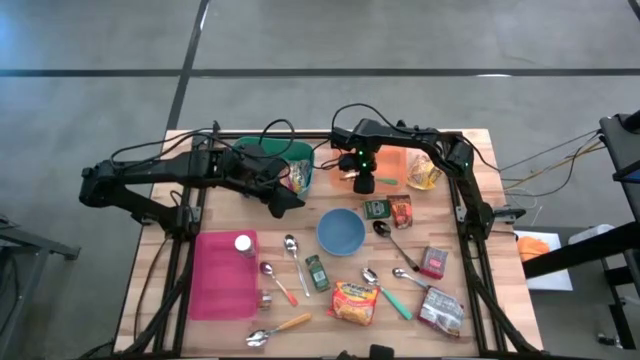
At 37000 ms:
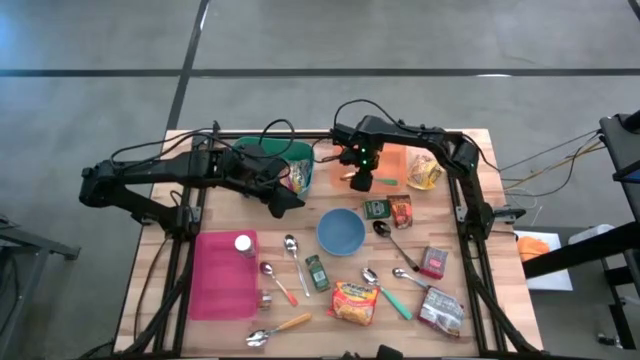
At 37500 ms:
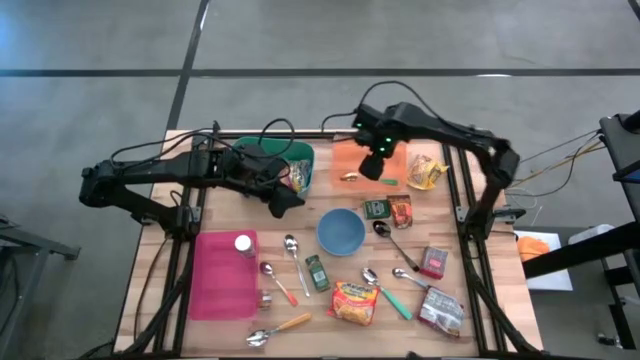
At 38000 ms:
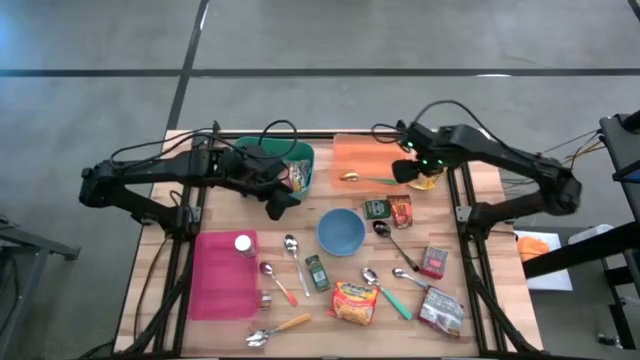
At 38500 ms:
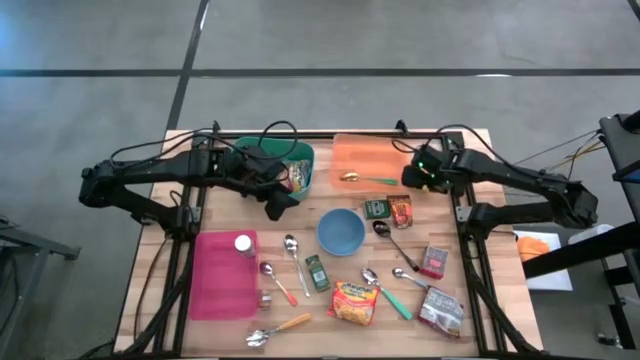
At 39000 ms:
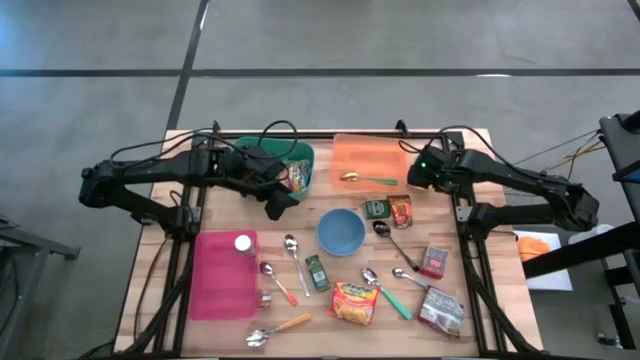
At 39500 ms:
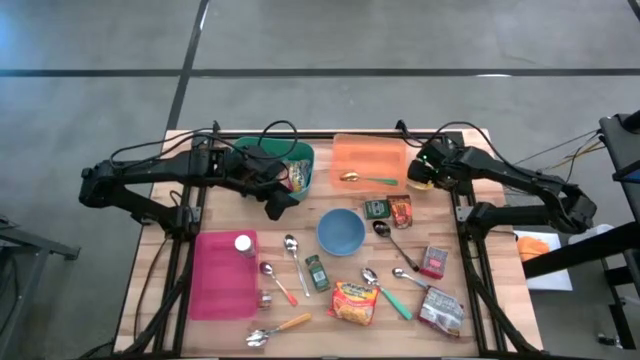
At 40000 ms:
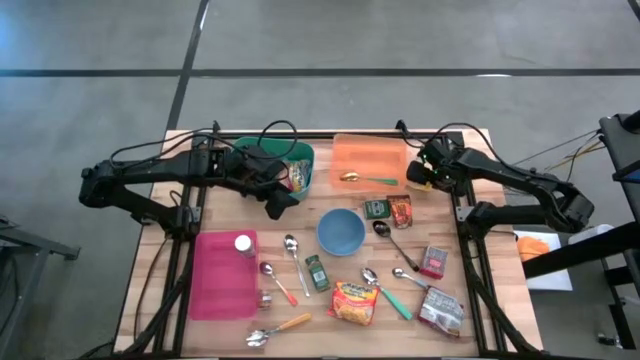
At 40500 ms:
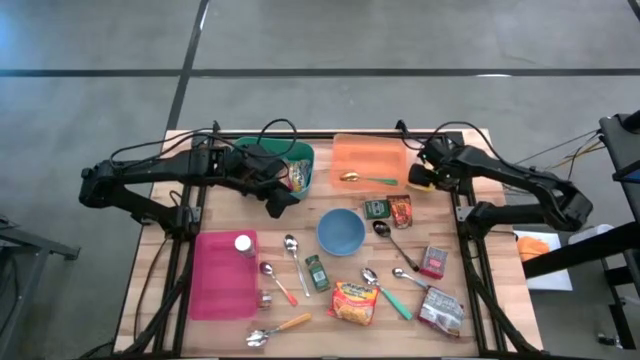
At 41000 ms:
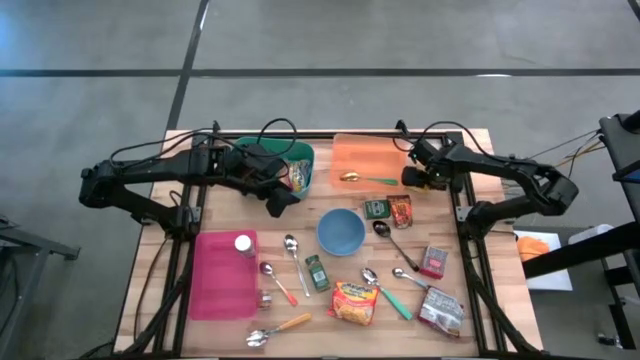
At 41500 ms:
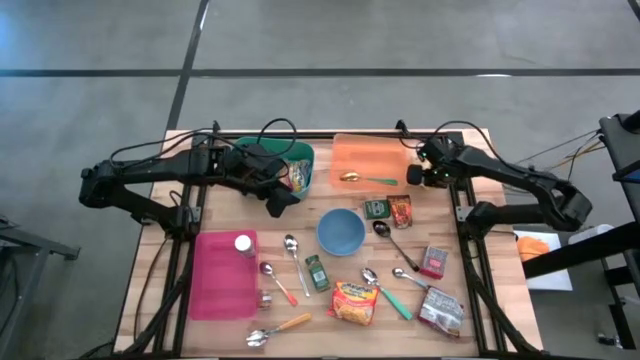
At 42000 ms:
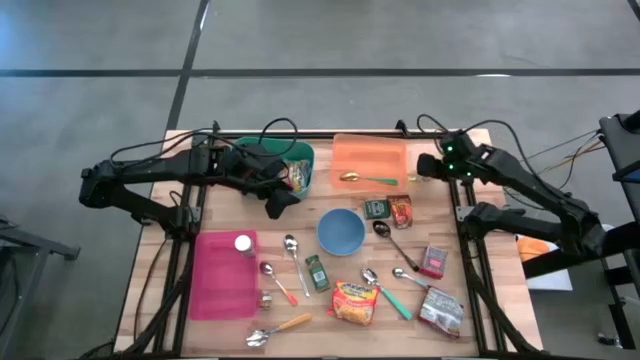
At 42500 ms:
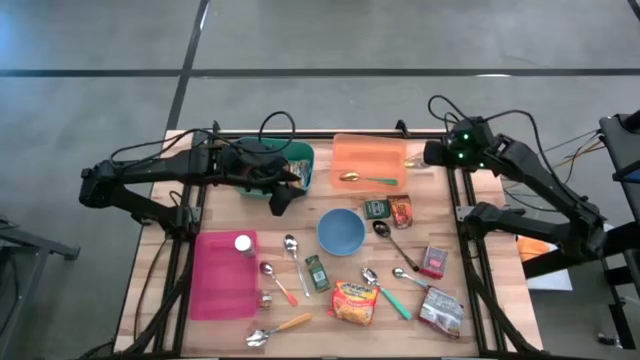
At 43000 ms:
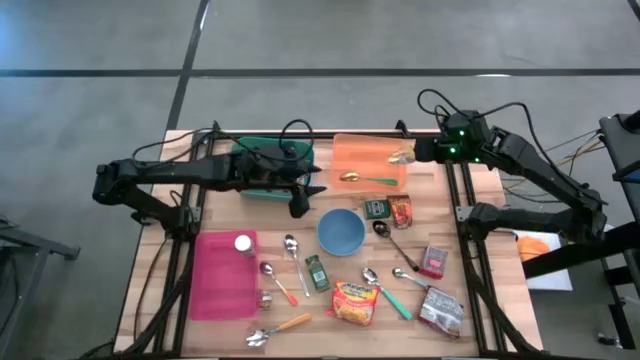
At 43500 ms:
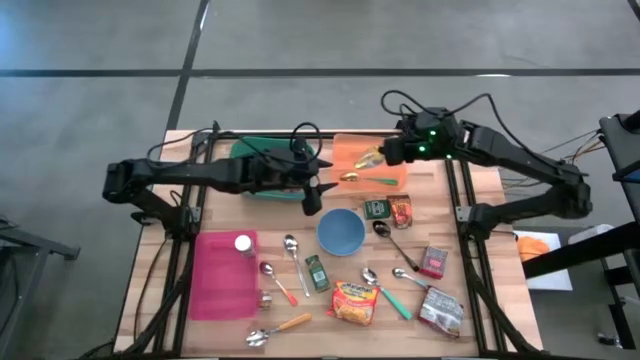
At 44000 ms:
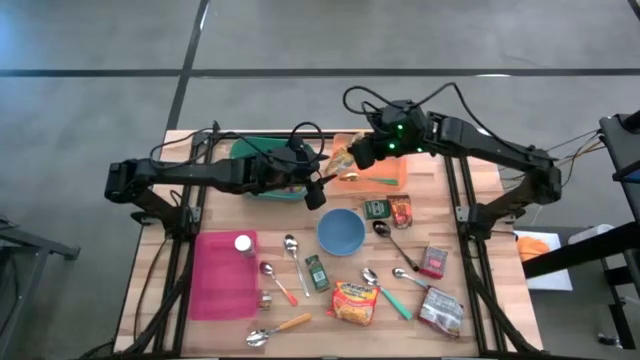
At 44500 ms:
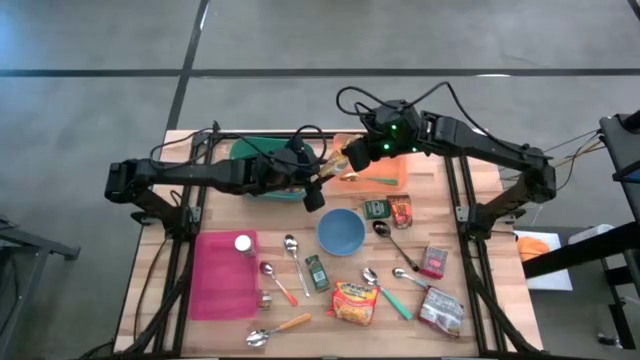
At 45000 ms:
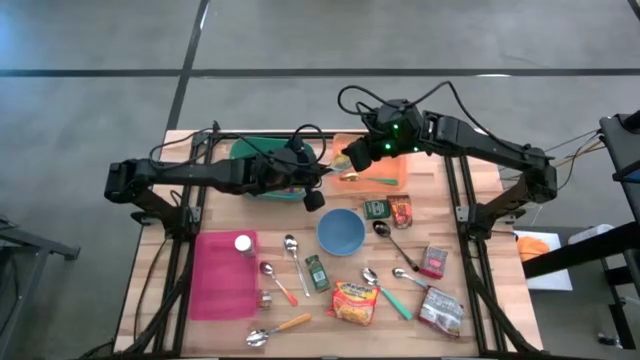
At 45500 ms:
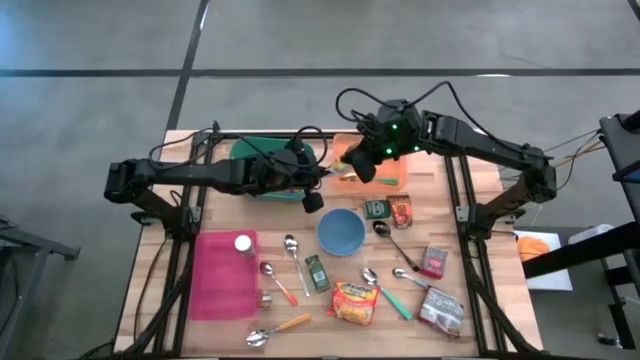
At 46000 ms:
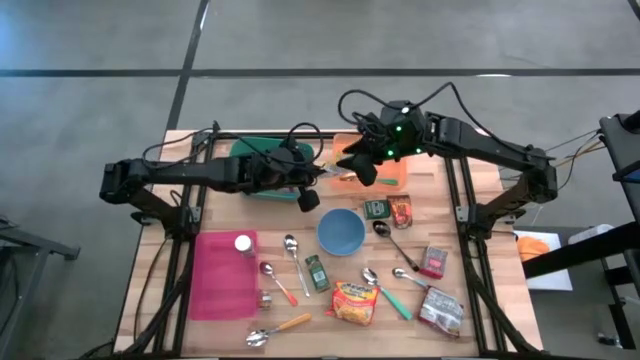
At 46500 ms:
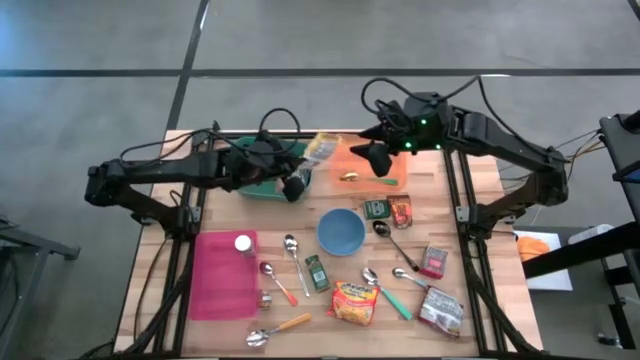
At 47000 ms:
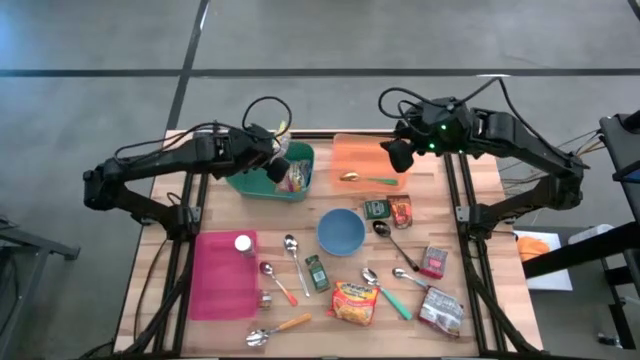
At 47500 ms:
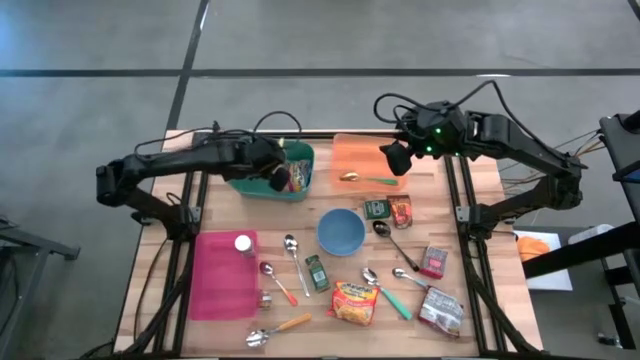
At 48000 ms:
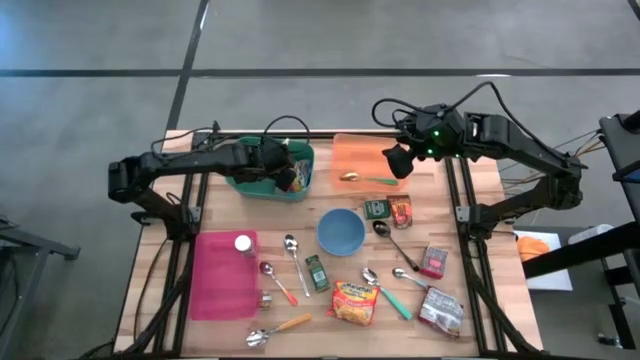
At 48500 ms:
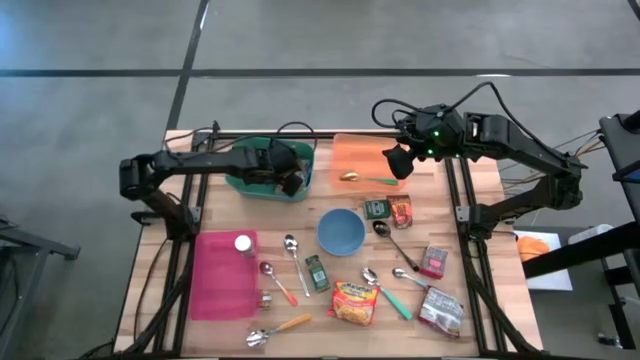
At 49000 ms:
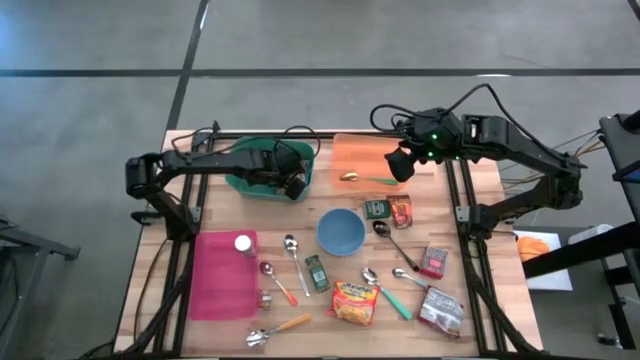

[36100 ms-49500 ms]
Put the yellow noodle pack into the green bin

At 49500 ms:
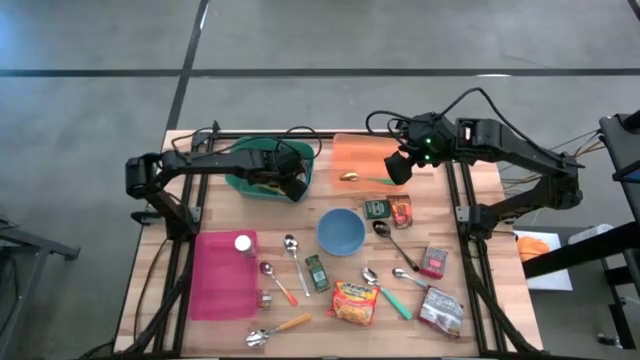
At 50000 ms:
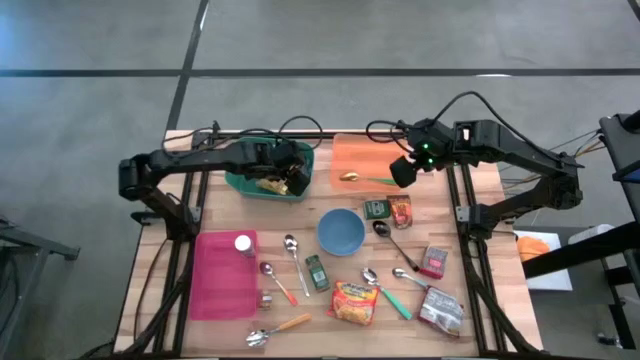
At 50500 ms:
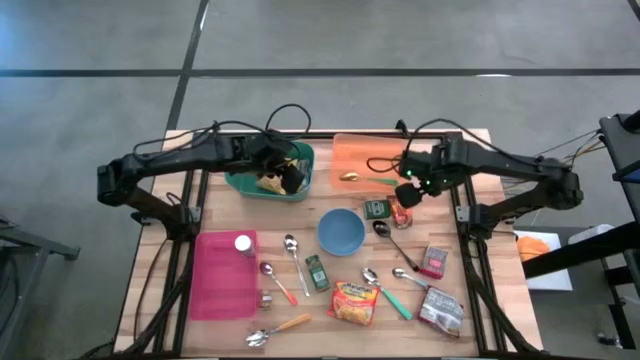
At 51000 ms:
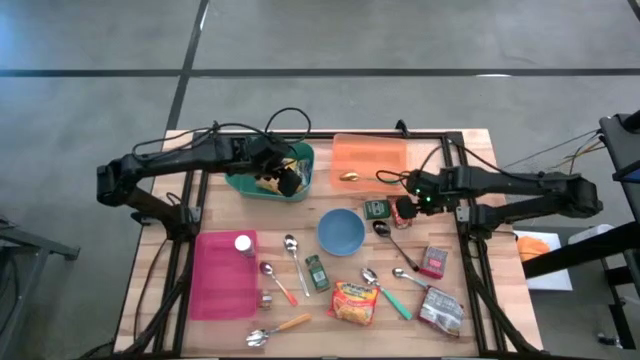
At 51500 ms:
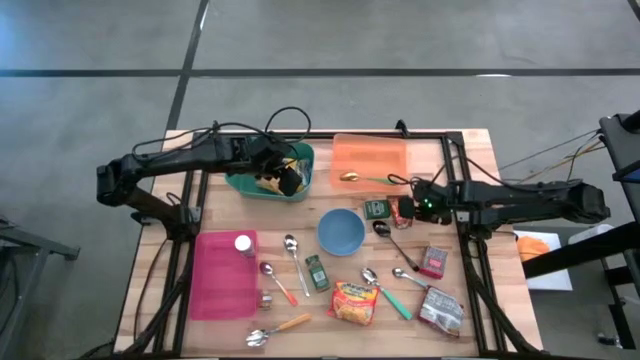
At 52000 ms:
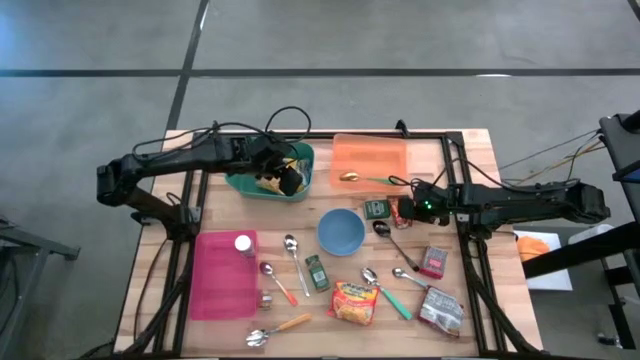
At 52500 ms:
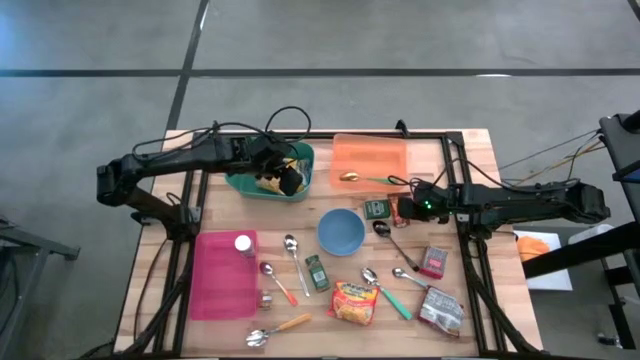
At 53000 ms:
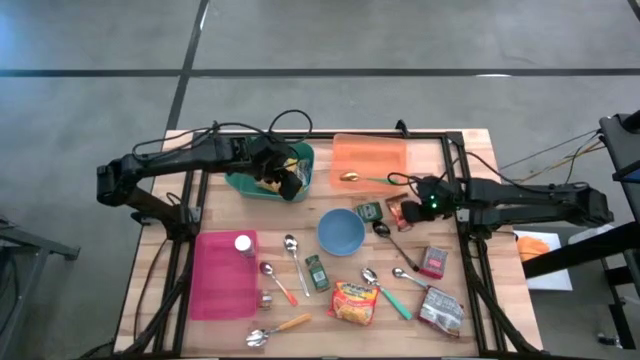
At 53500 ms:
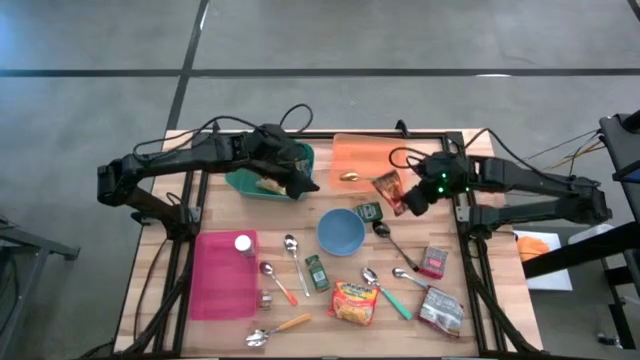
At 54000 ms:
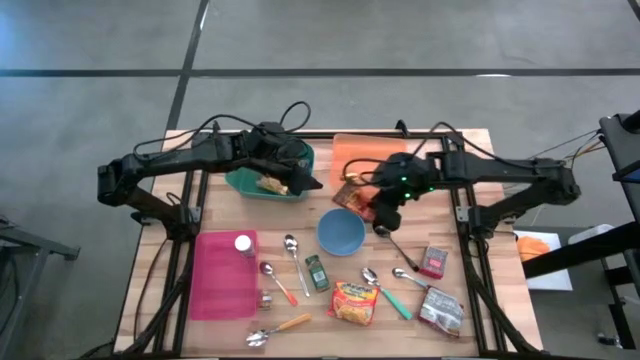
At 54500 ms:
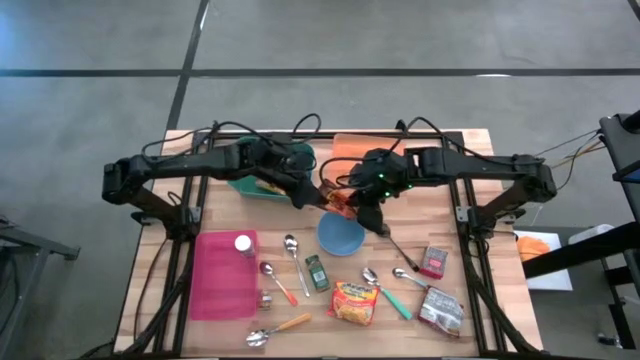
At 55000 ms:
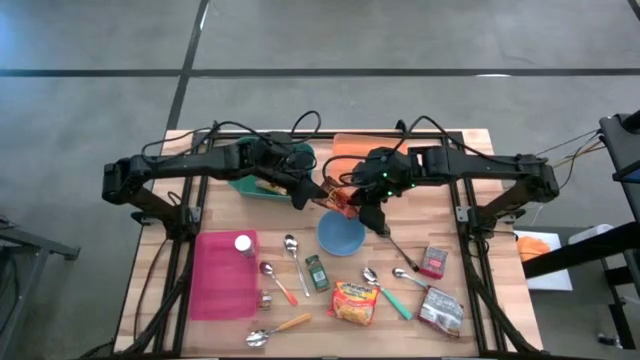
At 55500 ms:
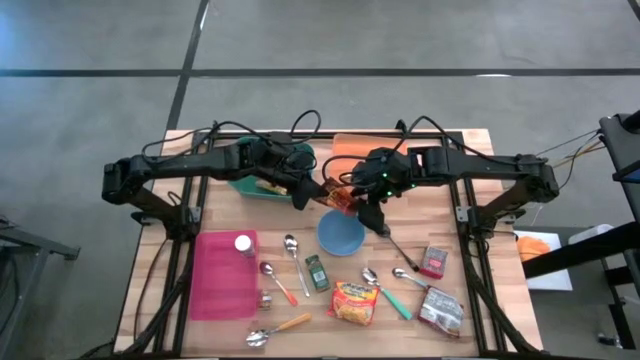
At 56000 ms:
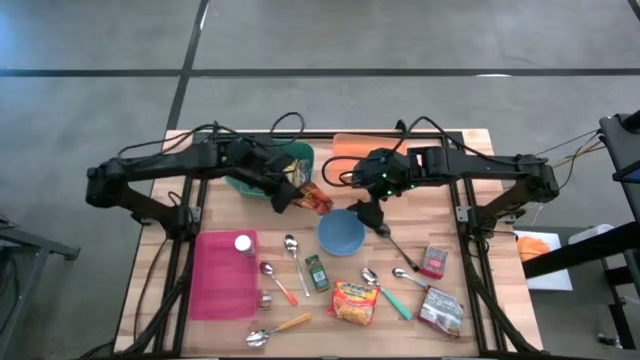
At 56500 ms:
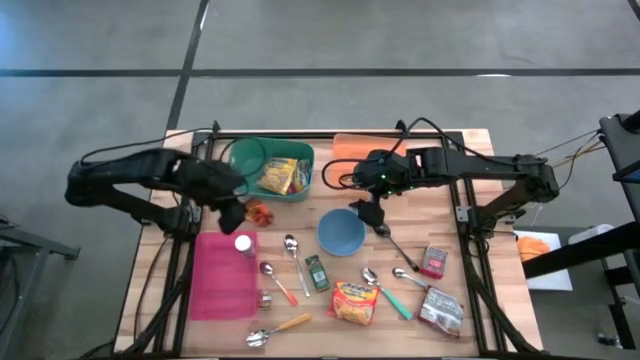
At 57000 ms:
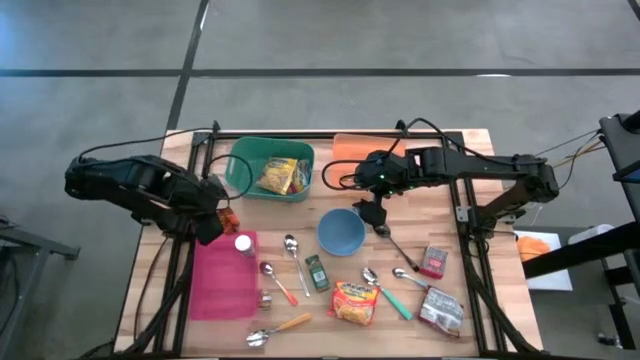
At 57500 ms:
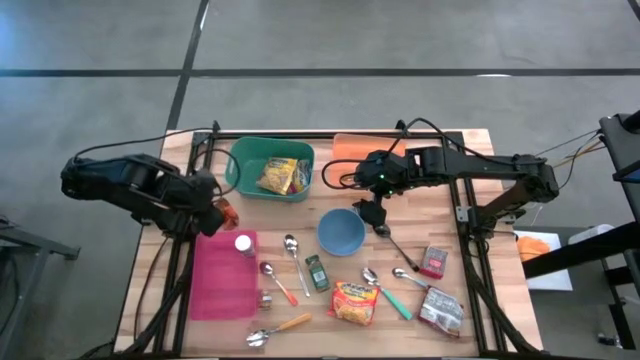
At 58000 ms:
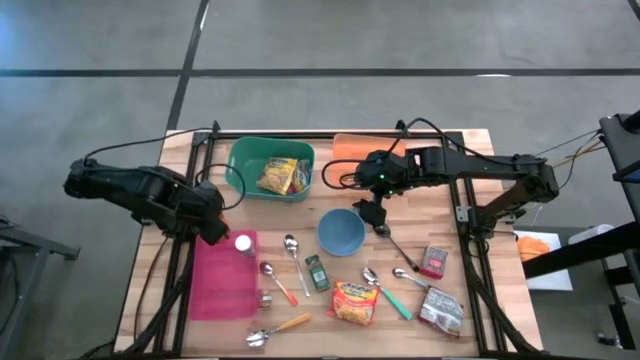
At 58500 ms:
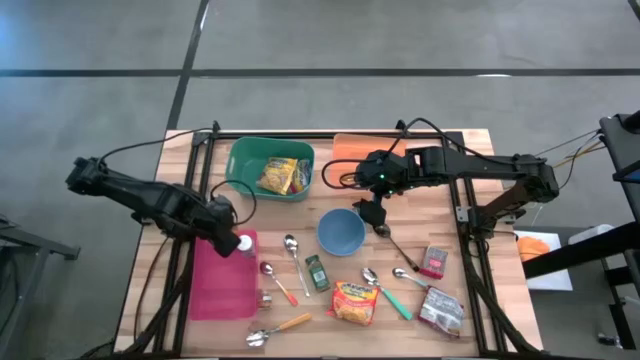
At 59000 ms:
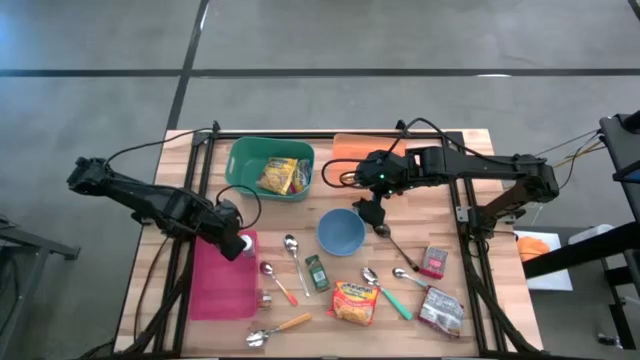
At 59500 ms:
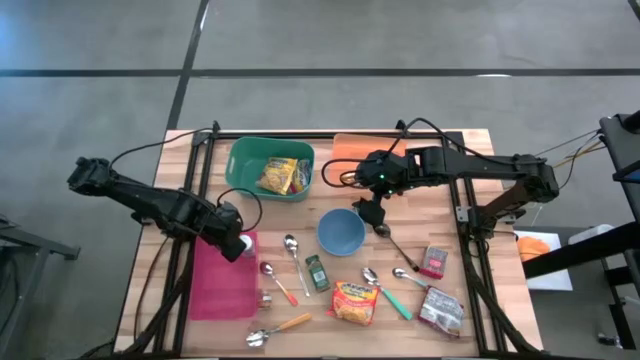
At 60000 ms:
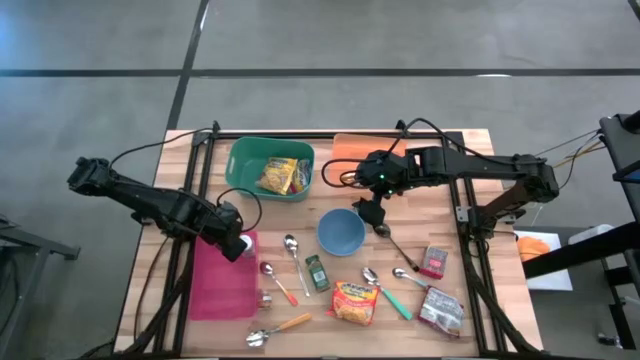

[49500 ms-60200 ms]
Put the orange seasoning bag into the pink bin
